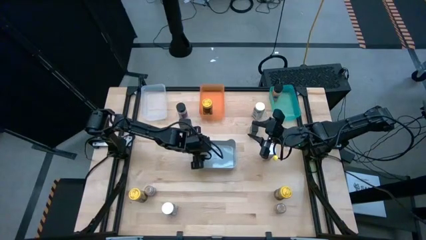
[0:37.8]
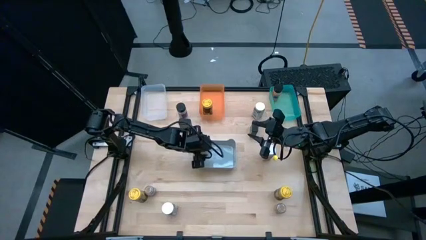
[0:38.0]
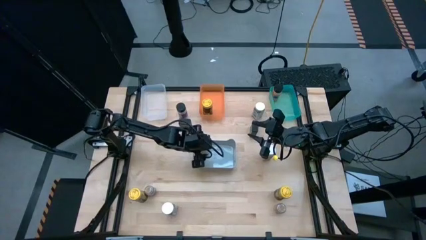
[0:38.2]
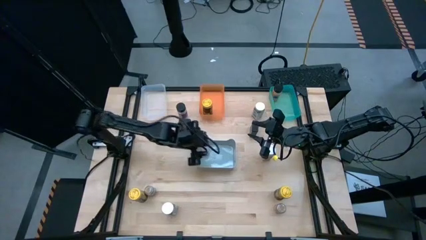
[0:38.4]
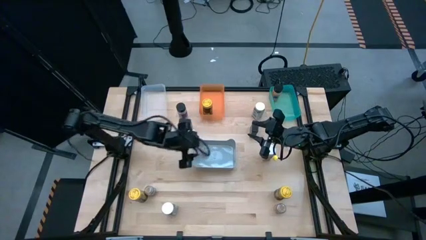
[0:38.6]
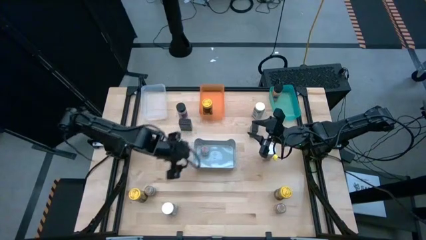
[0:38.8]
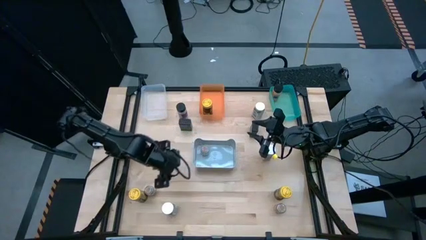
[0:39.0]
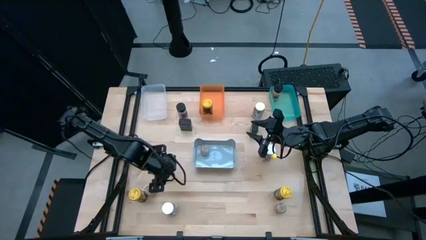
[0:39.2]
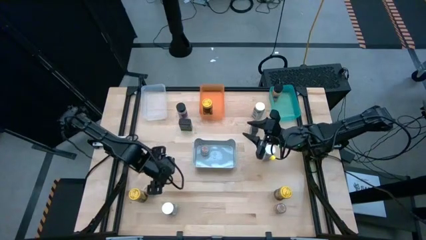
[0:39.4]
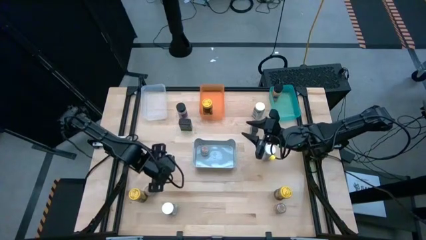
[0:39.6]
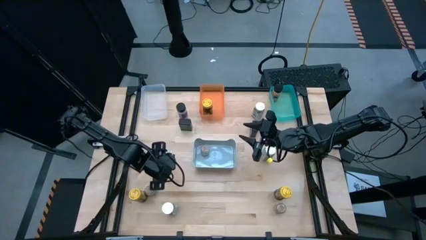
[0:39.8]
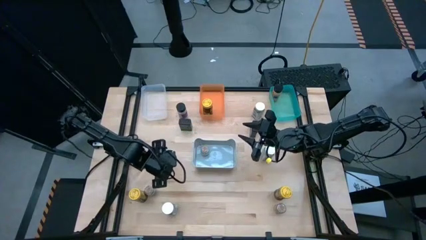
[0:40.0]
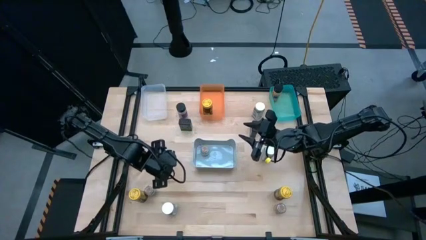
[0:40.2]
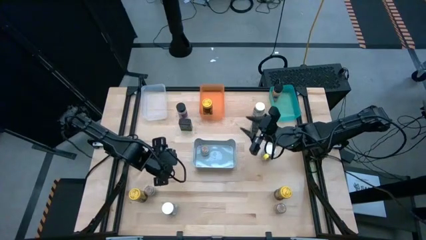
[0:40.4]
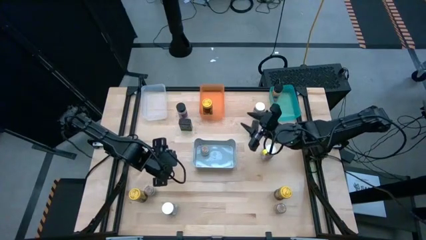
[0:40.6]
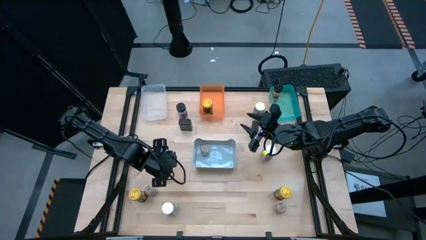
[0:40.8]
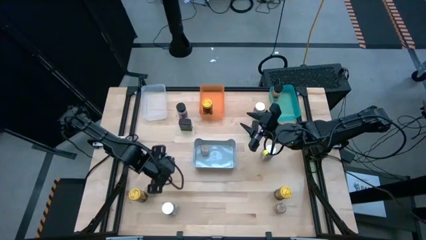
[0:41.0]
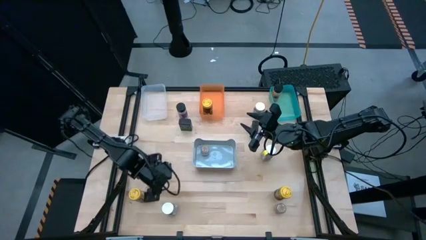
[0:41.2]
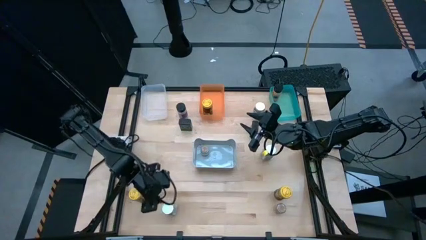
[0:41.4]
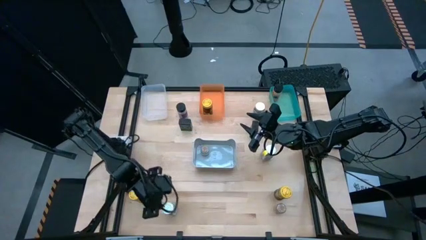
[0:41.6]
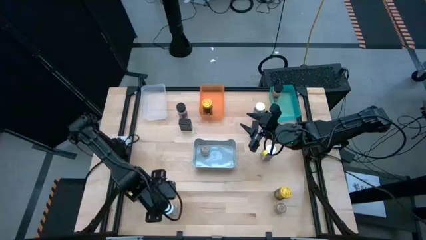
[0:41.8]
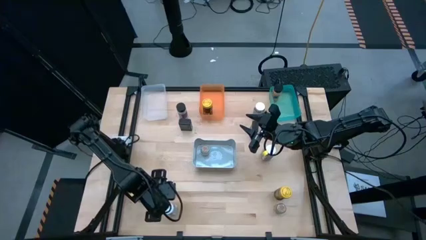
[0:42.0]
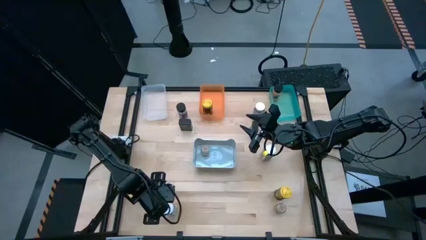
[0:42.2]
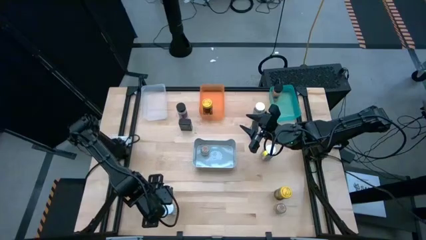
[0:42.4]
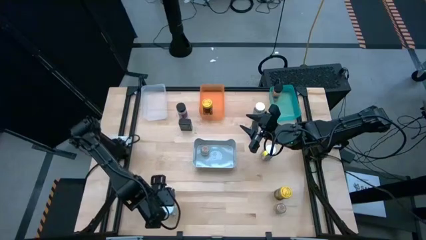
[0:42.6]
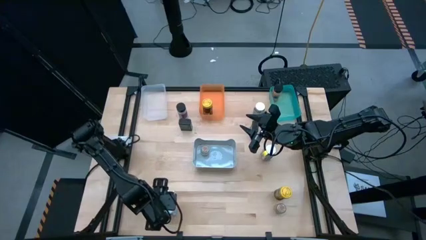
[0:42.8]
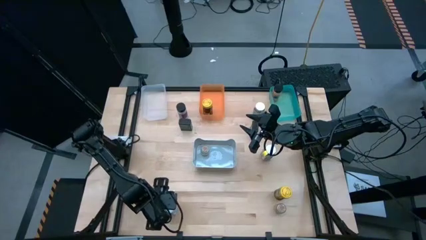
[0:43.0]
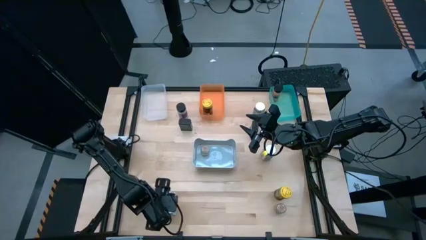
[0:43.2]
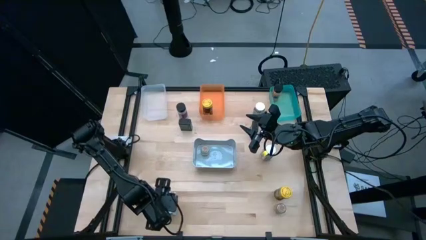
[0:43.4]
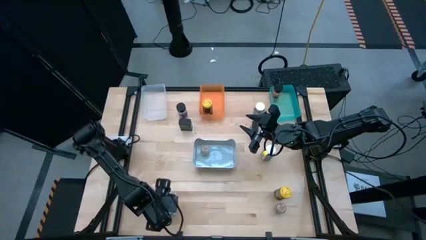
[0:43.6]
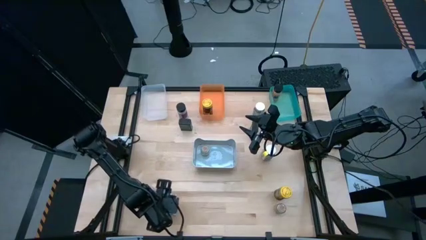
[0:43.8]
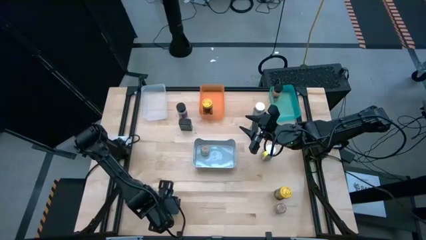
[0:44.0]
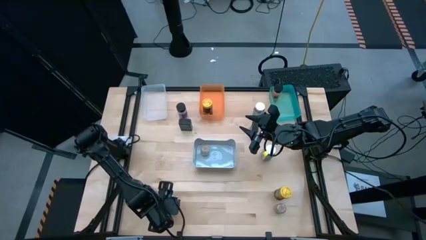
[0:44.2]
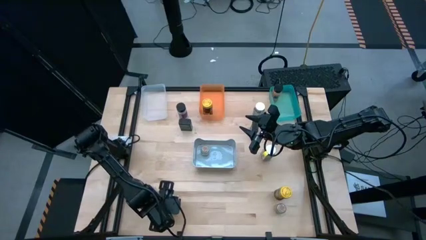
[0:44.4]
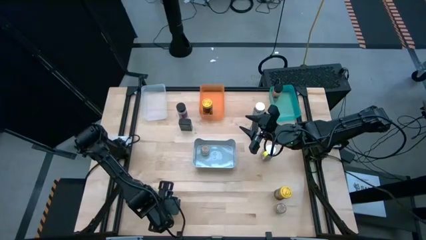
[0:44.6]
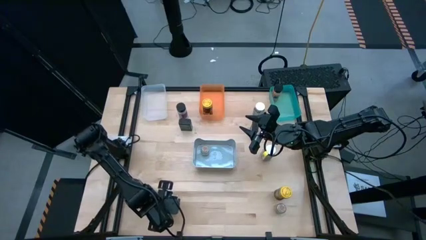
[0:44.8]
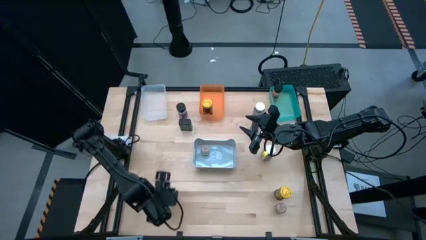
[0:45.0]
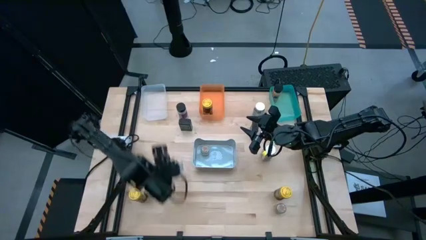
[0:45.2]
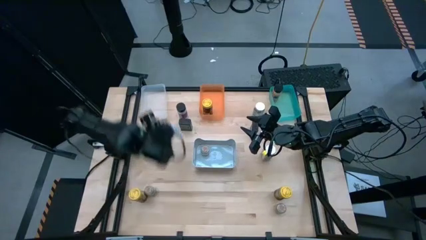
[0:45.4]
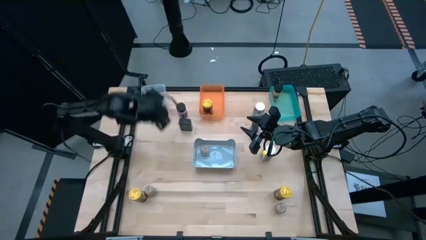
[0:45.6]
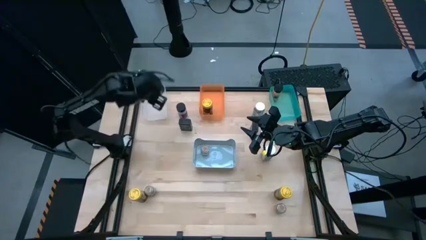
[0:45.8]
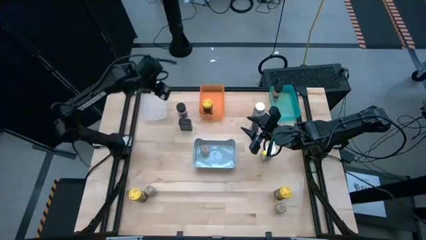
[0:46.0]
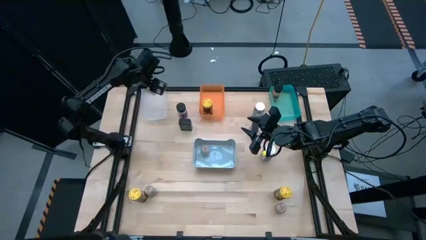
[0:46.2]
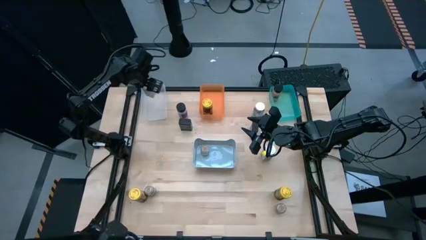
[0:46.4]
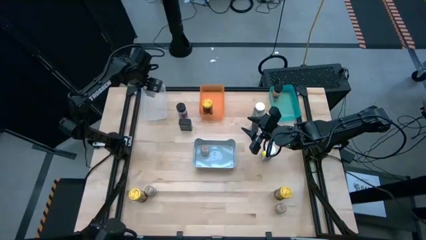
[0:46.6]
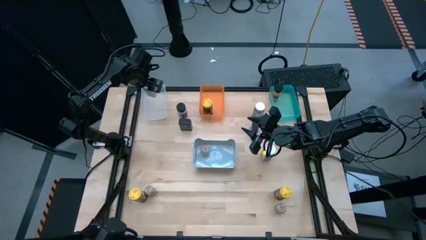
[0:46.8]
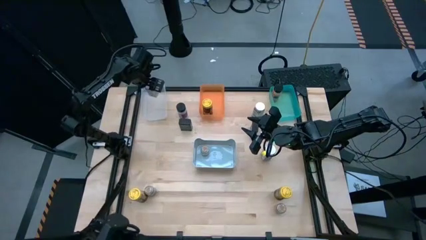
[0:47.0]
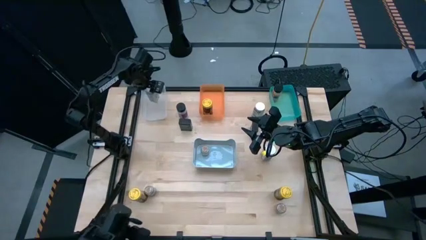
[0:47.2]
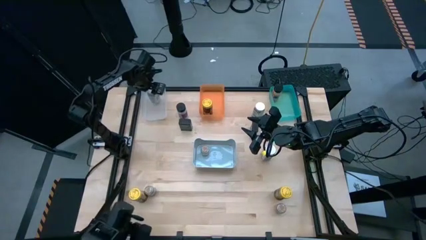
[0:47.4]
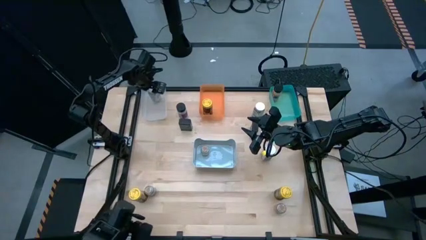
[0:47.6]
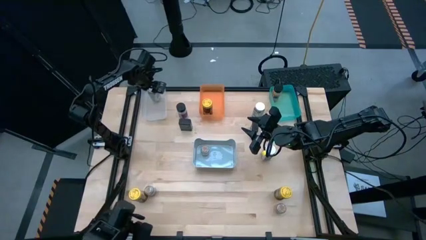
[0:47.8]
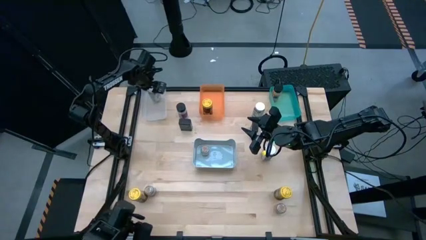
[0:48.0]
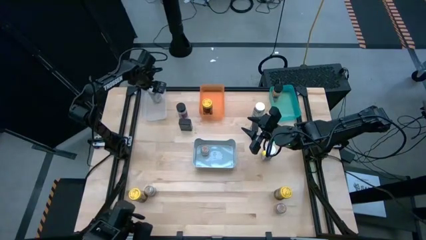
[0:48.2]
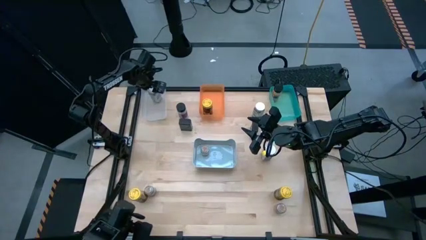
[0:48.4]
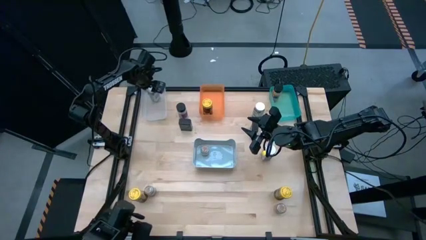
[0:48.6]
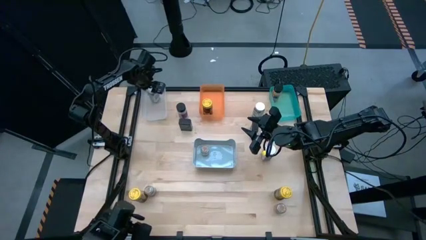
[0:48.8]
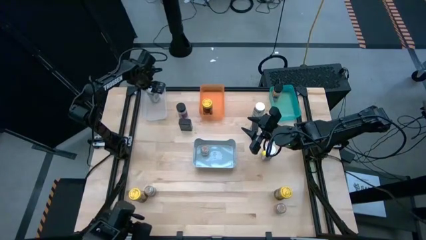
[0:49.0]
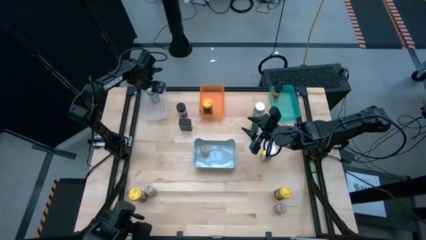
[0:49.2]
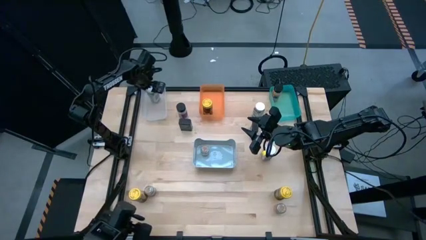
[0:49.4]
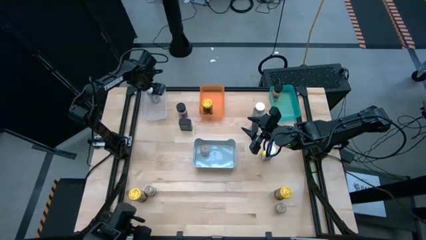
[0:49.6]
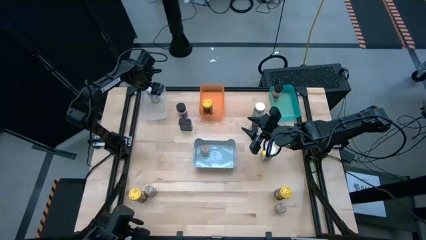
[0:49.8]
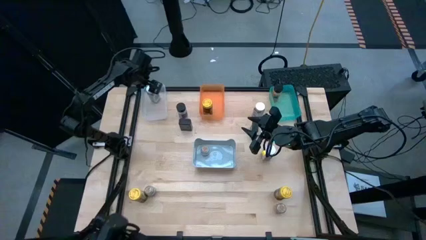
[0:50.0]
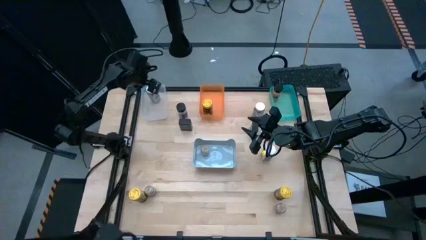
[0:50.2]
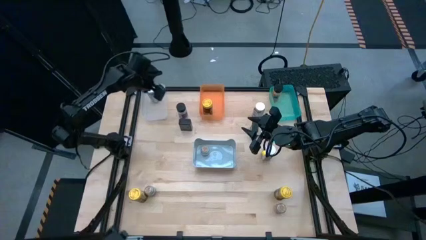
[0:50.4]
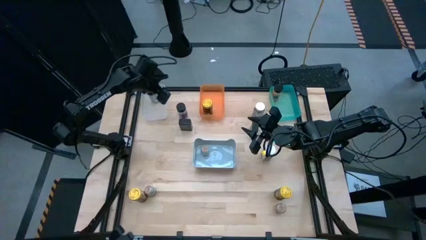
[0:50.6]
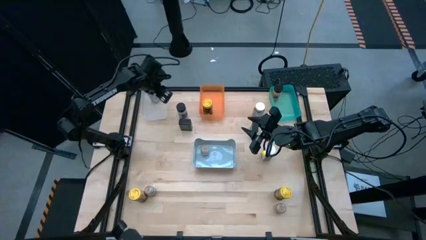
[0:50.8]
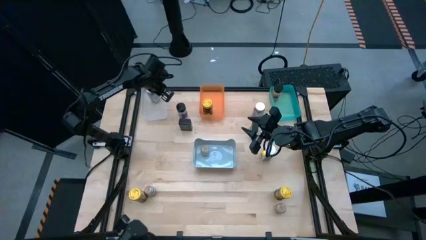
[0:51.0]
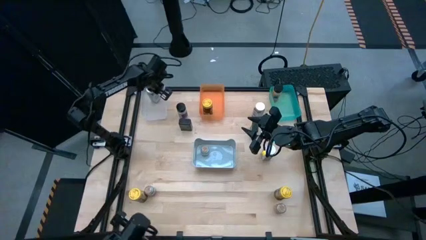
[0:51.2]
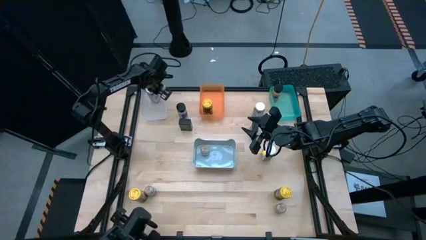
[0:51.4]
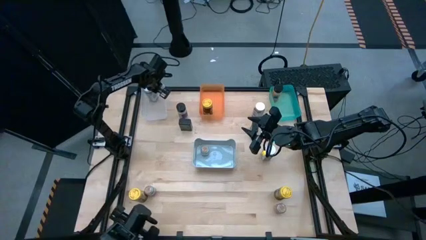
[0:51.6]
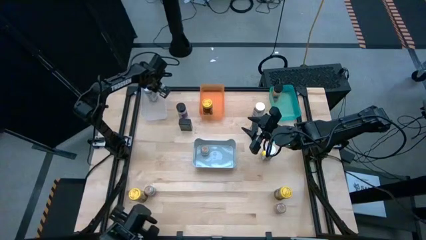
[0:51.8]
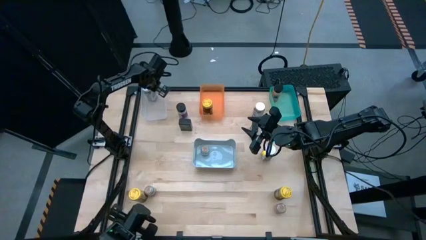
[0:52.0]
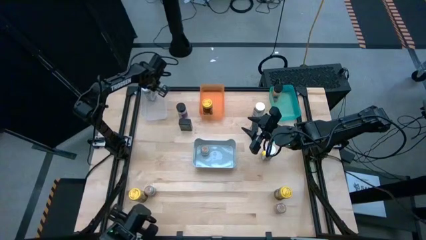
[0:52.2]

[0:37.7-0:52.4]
Task: Sort spices by type
Put the bottom white seasoning bottle into the transparent bin

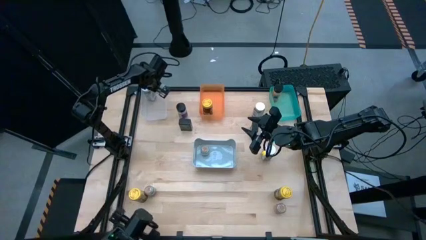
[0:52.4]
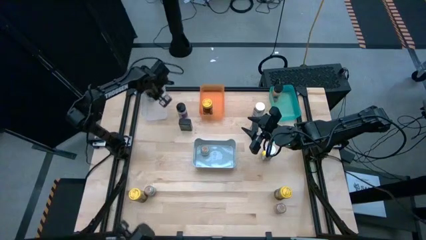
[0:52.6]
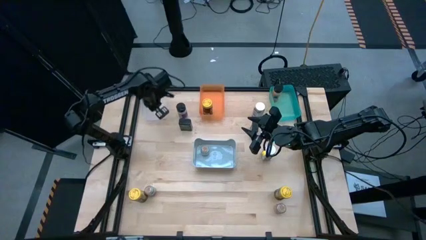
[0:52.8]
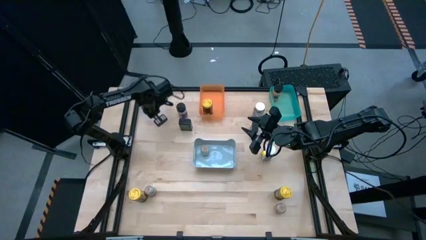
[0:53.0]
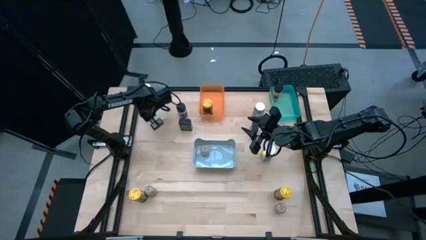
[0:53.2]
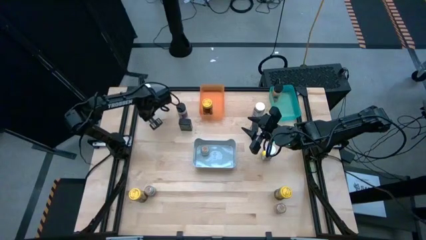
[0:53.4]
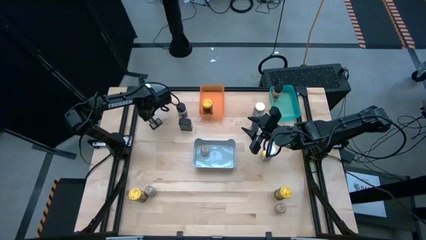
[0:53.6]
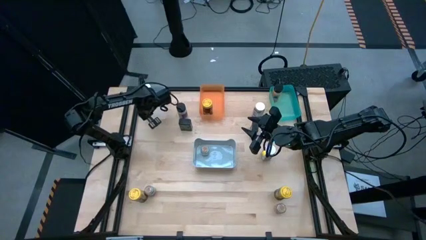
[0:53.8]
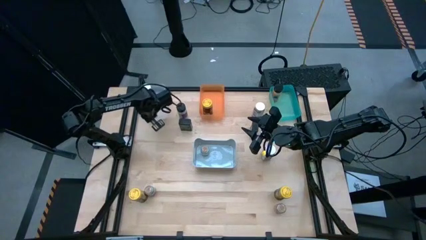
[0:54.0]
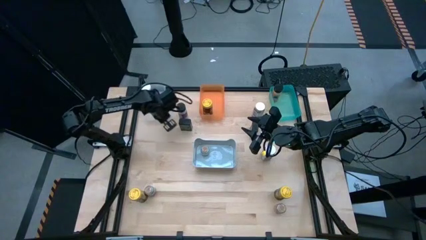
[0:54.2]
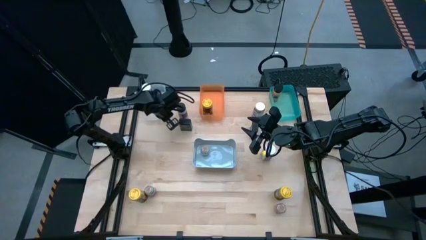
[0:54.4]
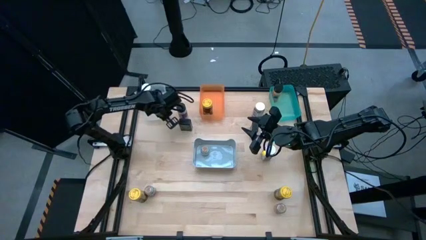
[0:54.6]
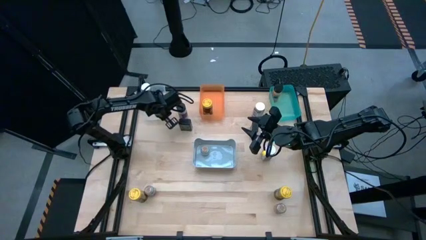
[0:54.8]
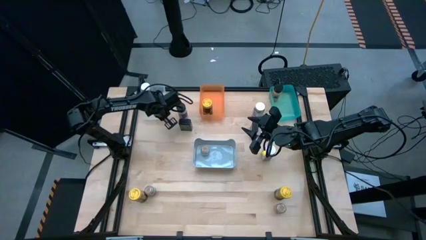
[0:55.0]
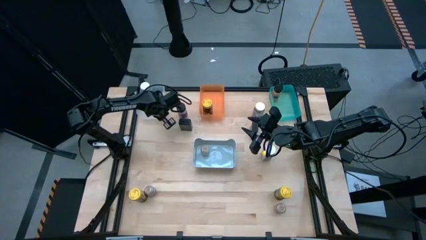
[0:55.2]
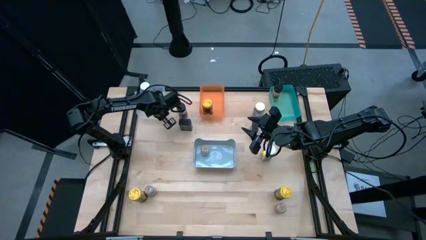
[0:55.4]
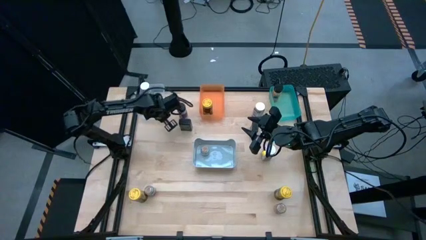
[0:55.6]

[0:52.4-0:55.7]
Adjust the transparent bin
